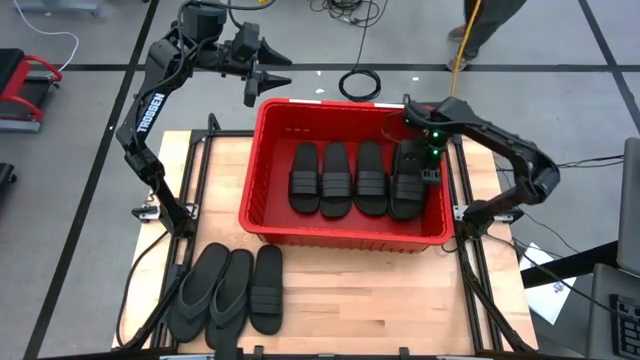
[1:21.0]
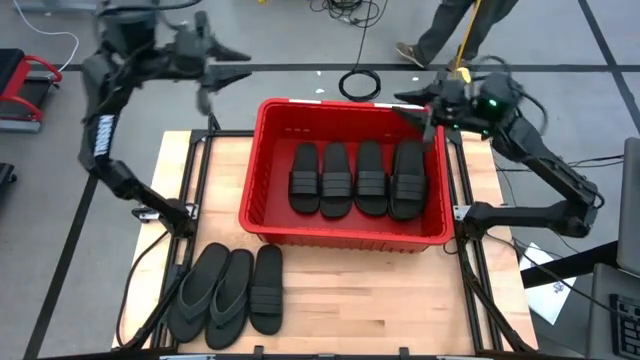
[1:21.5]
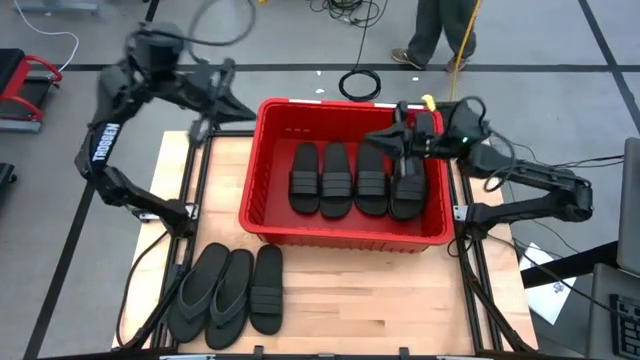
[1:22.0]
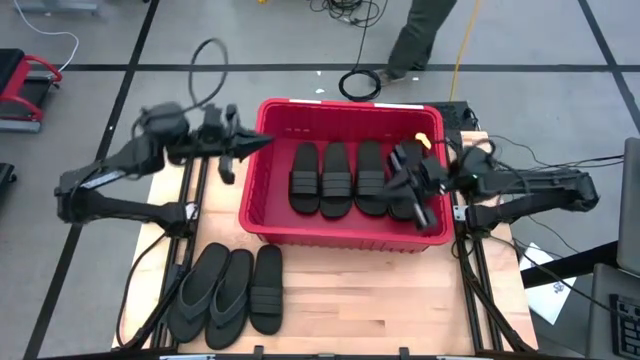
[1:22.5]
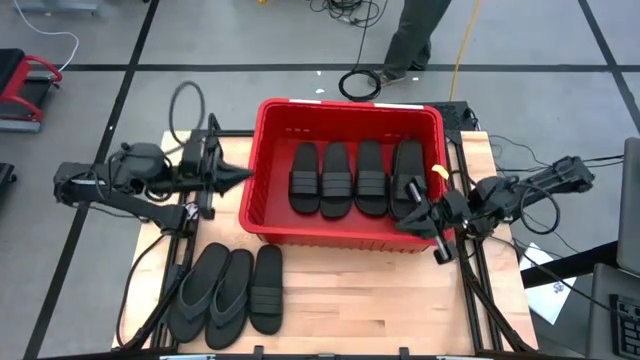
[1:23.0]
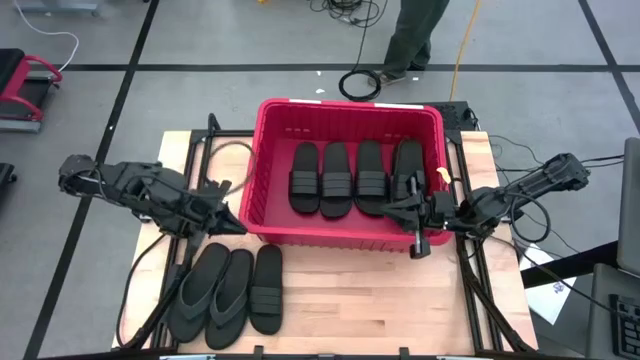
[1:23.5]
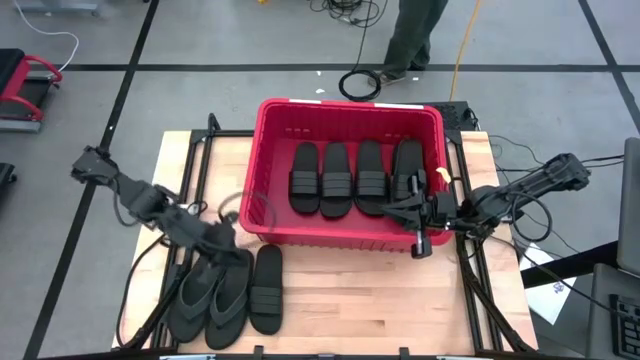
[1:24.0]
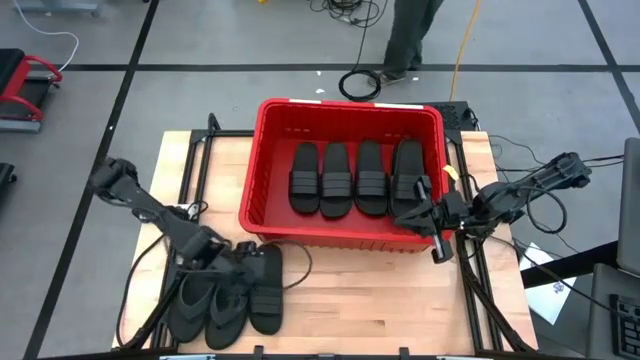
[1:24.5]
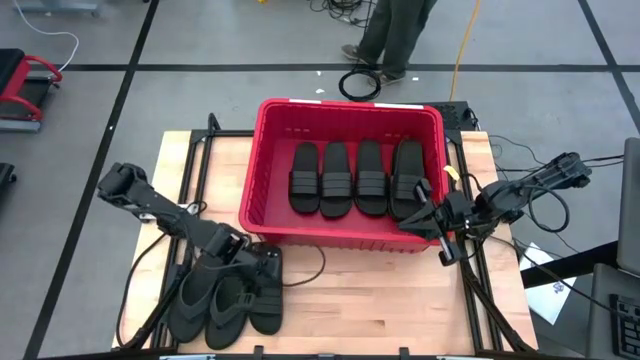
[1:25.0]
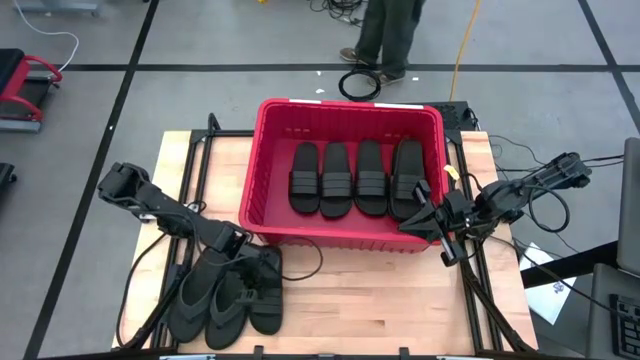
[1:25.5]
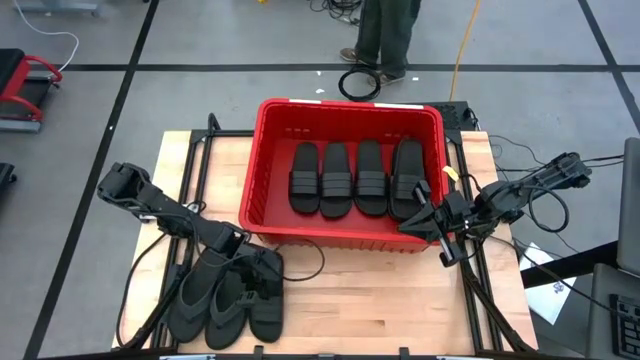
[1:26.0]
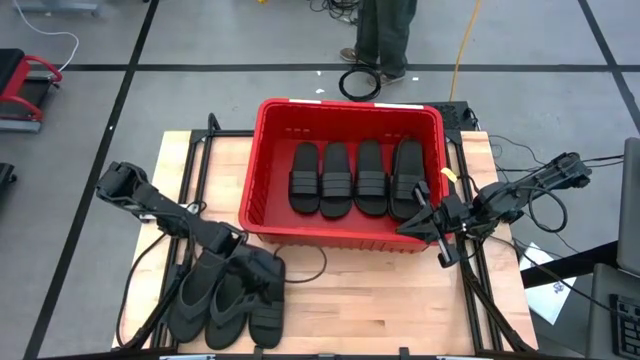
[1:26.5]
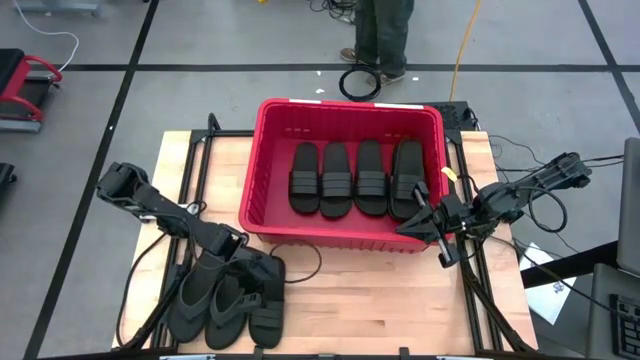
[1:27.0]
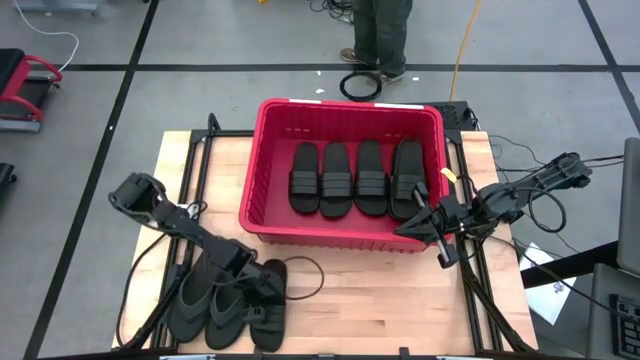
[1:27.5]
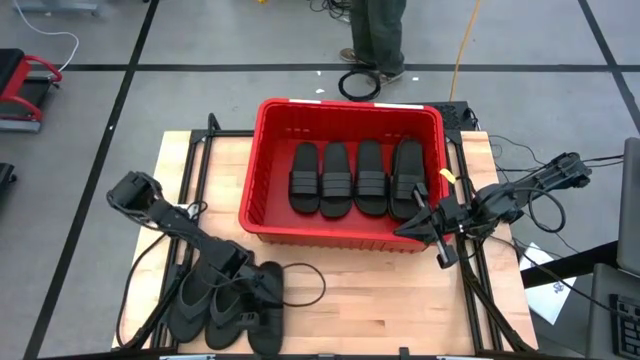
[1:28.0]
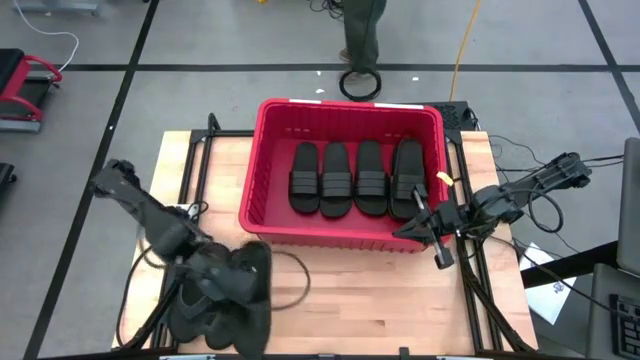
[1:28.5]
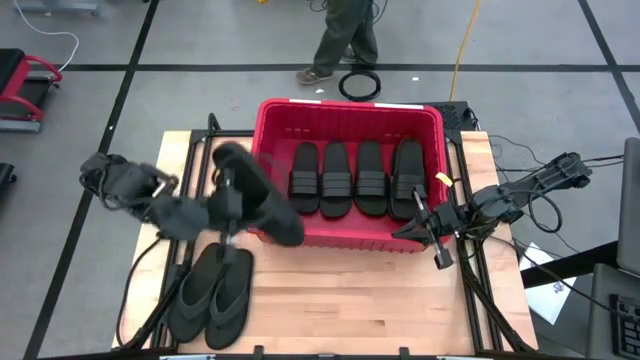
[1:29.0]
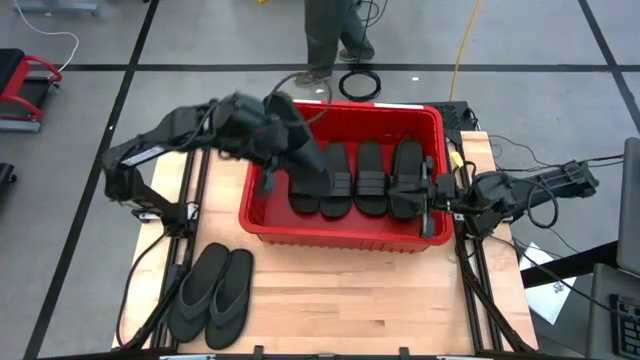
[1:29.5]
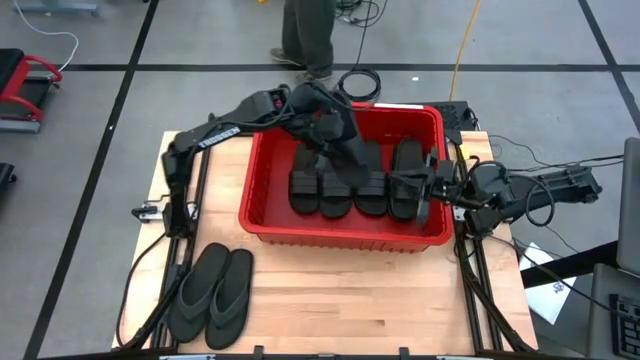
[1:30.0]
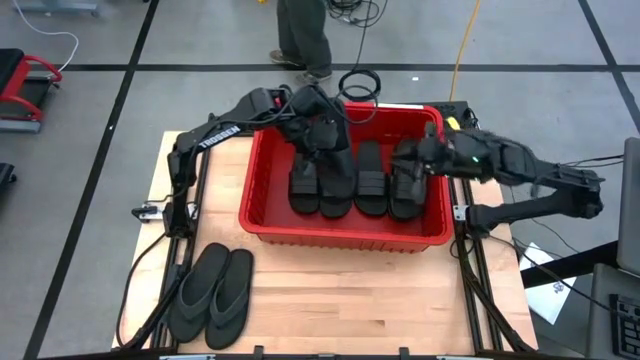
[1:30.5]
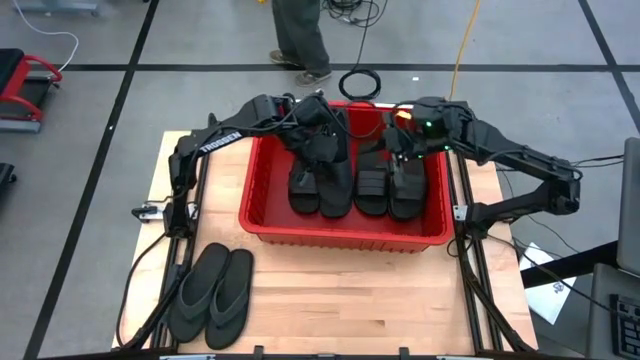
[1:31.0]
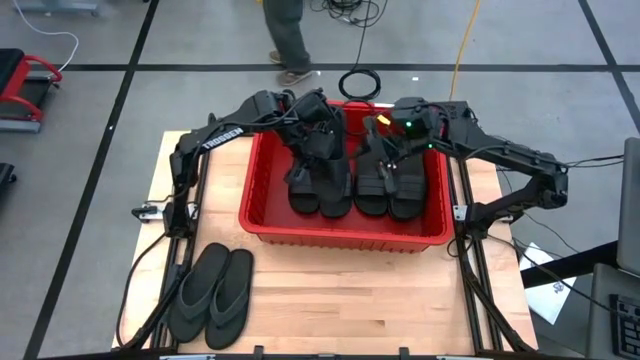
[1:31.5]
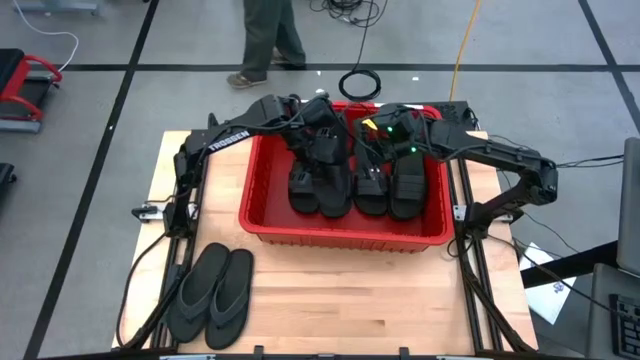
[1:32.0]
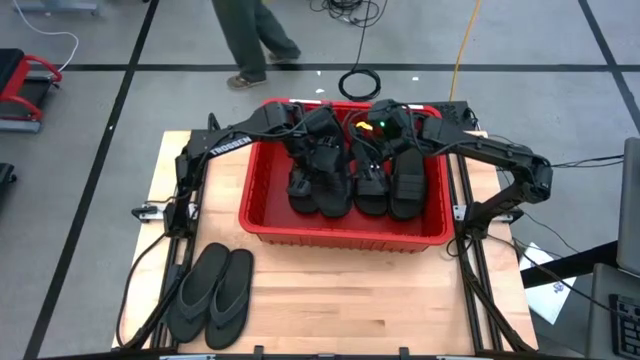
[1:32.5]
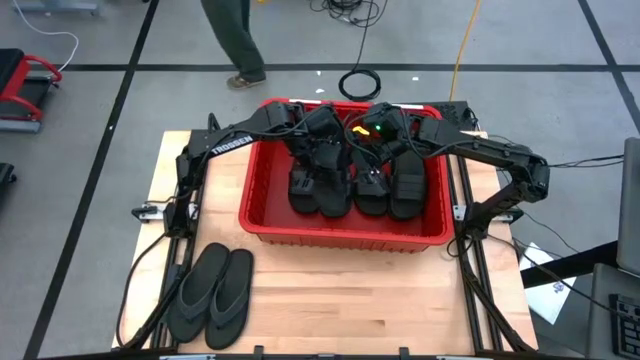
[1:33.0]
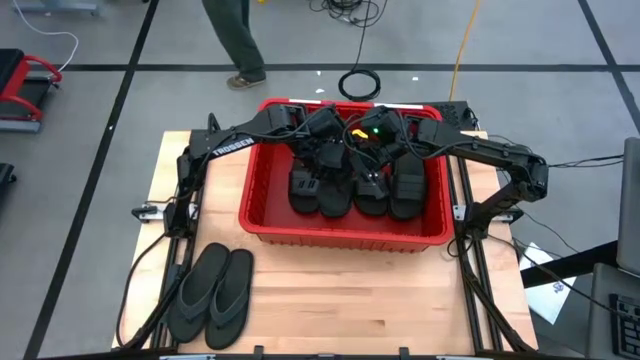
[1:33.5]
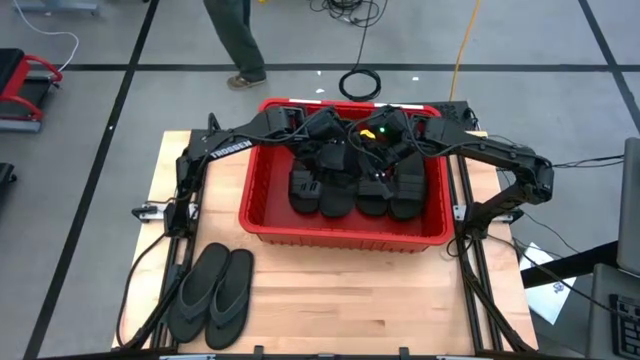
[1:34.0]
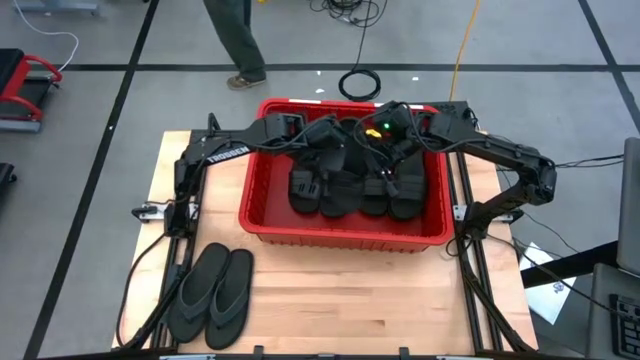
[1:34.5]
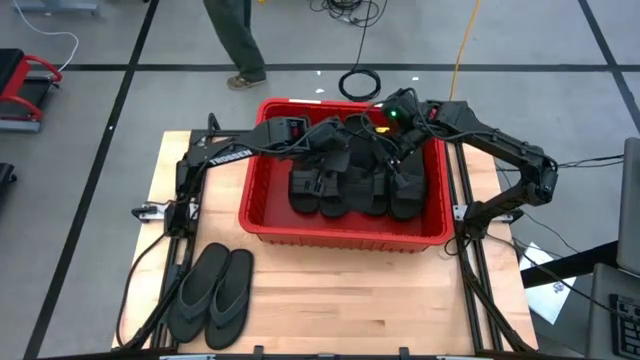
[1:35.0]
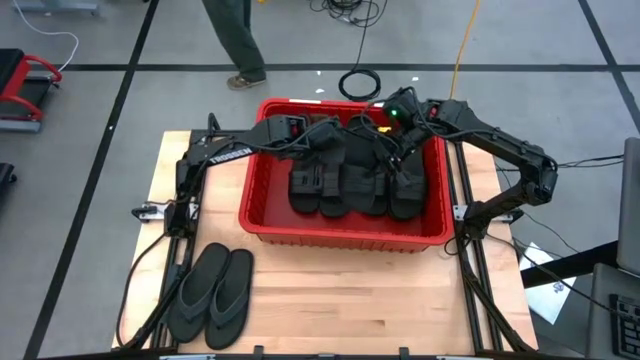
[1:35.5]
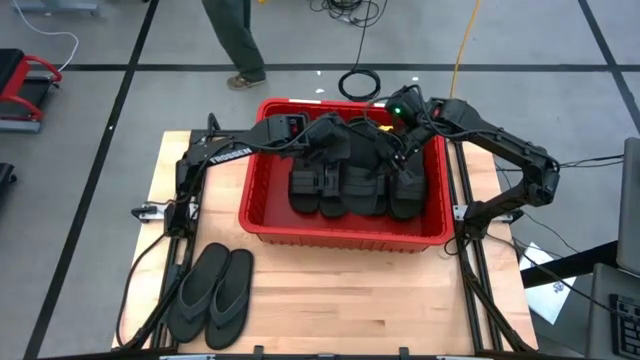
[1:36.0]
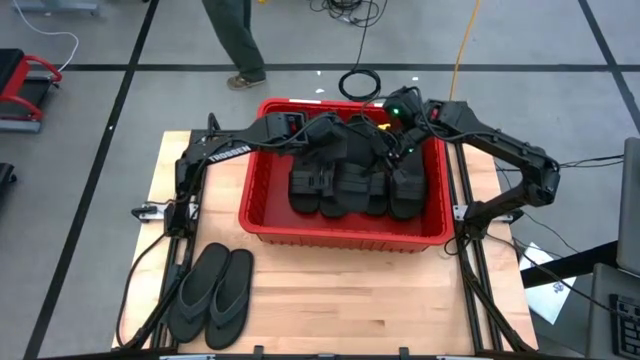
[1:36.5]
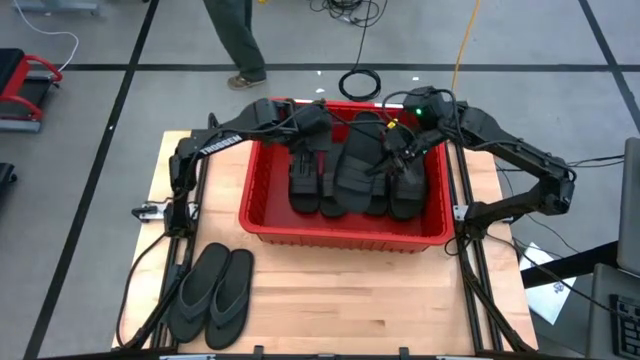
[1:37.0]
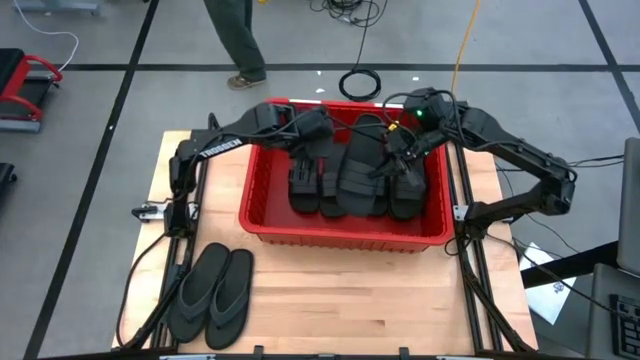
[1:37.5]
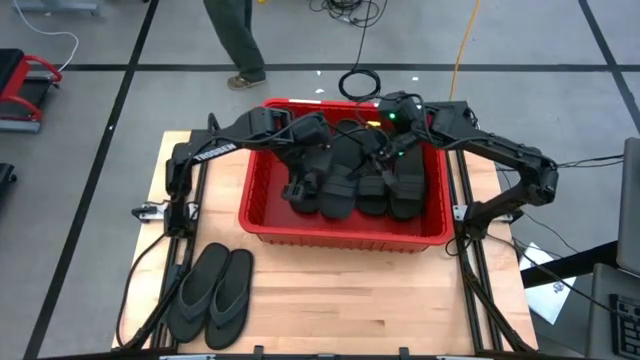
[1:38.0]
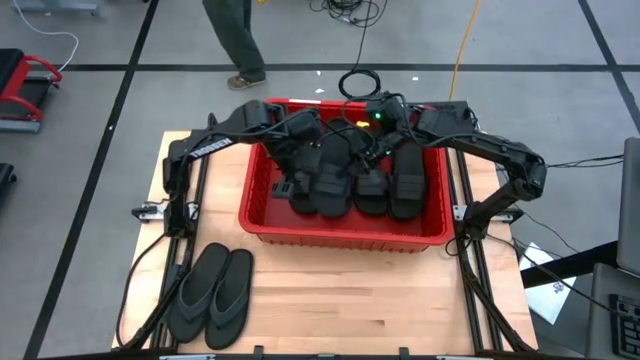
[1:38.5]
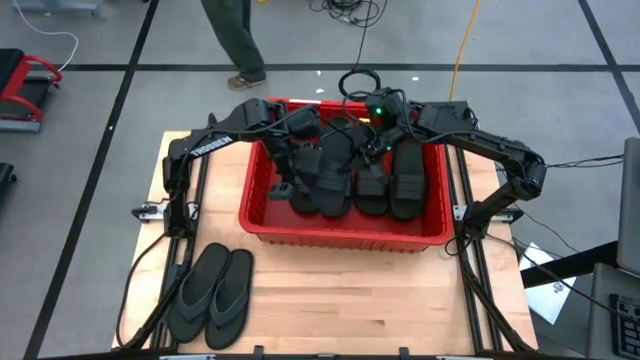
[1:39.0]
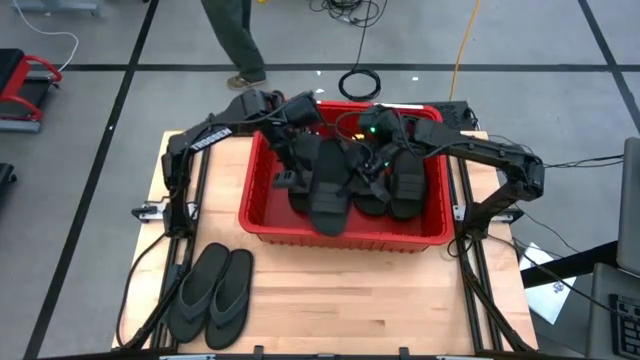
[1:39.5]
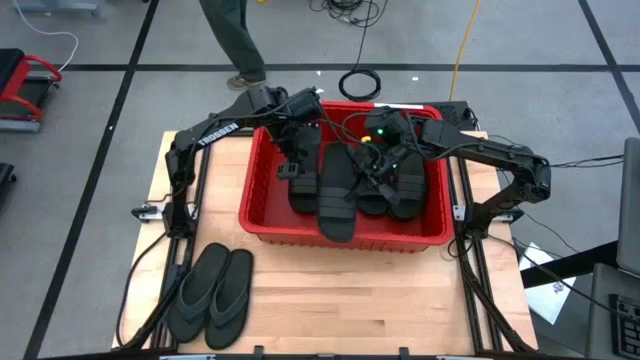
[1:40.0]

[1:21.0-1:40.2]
Task: Pick and place slides into bin
Put the black slipper into the red organizer bin

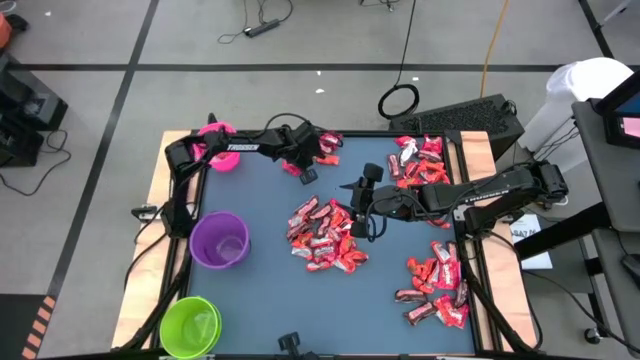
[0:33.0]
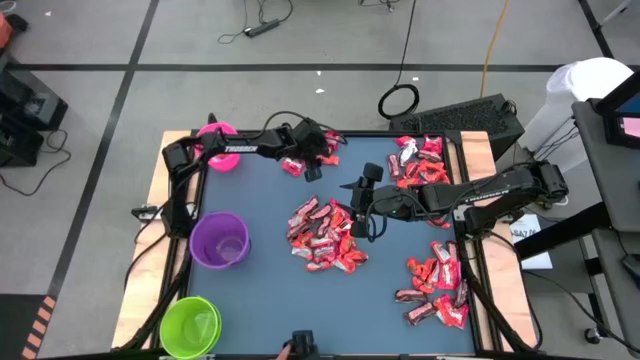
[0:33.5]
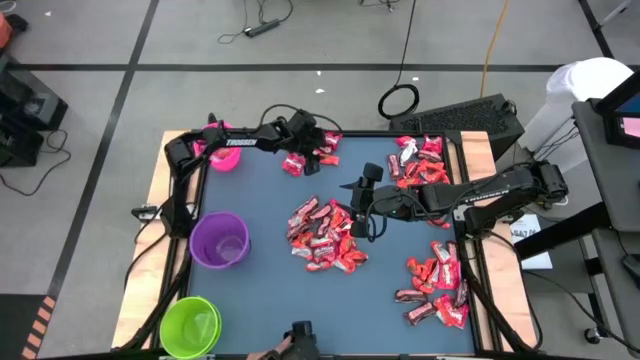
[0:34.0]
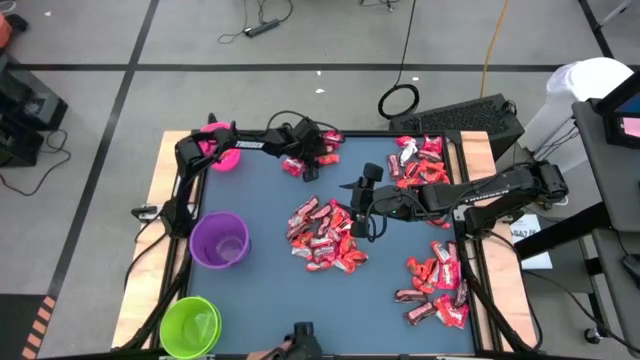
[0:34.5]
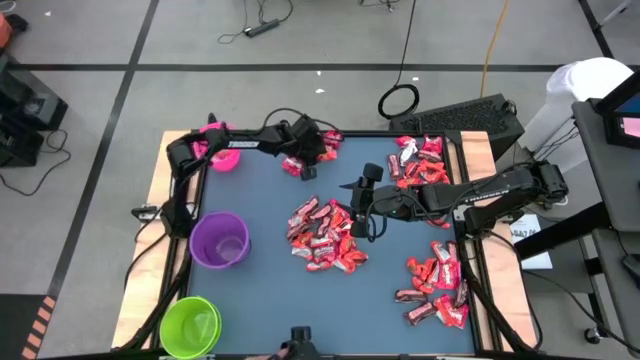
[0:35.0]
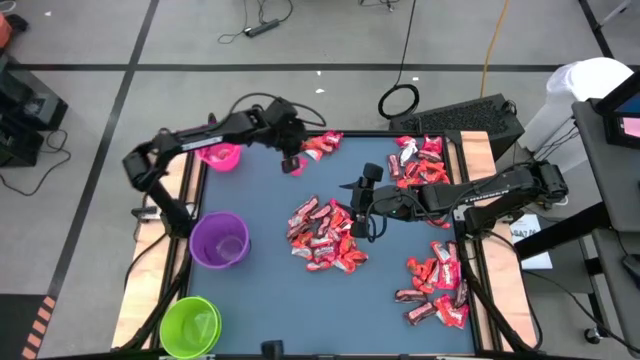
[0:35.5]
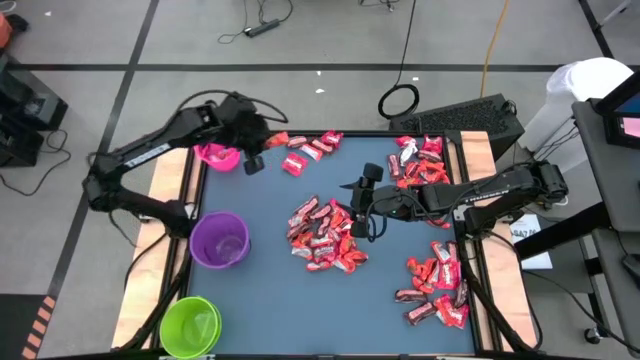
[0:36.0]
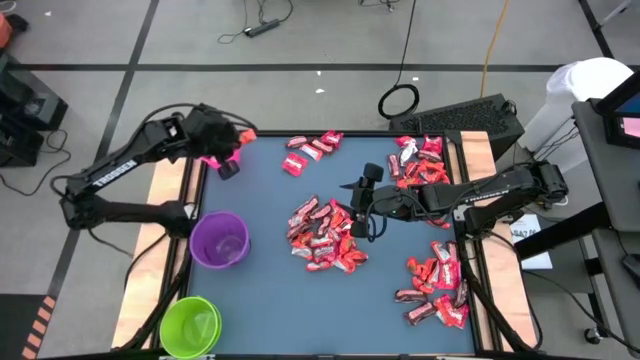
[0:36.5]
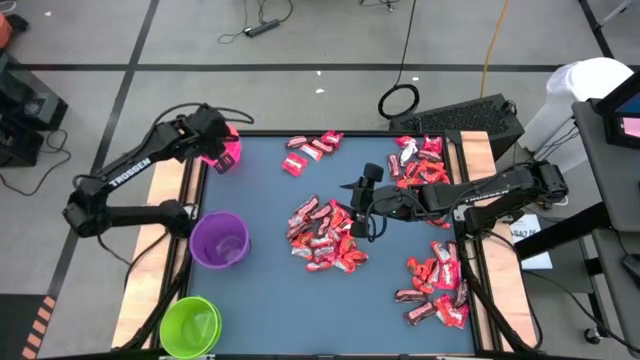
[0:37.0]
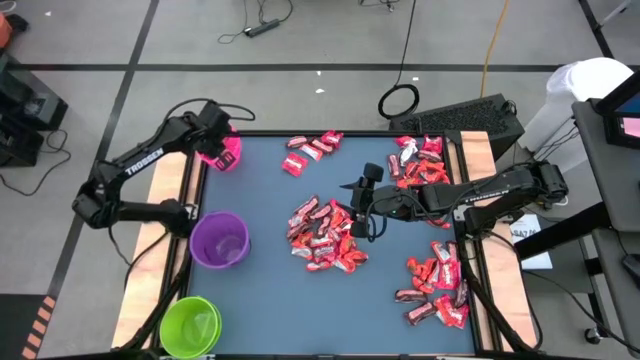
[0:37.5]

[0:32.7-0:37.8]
Task: Organize candy in baskets
Put the orange chocolate into the pink bucket
